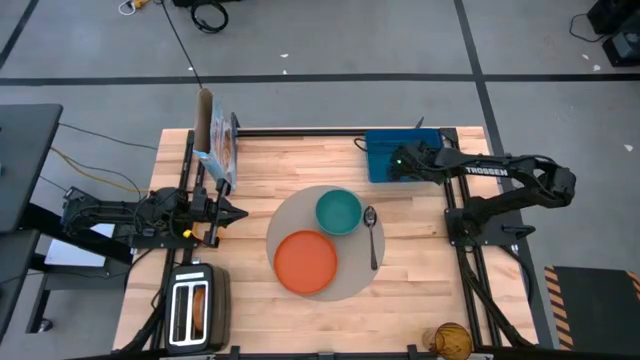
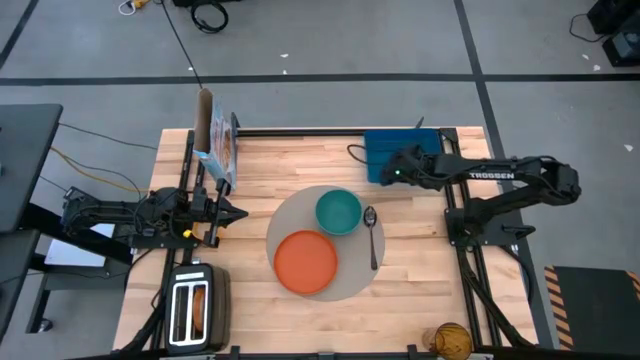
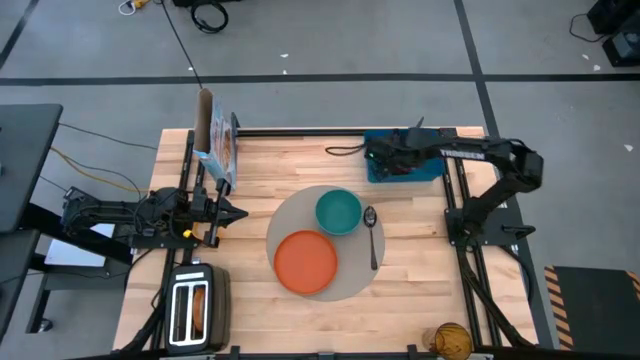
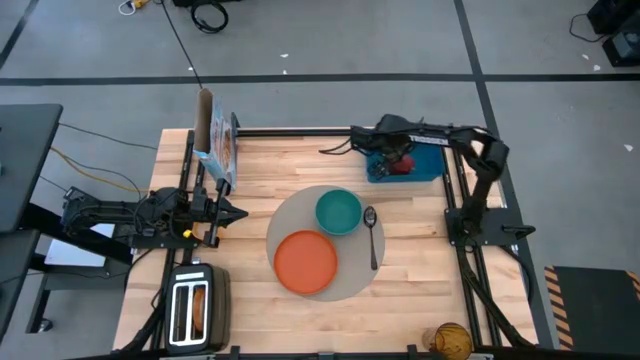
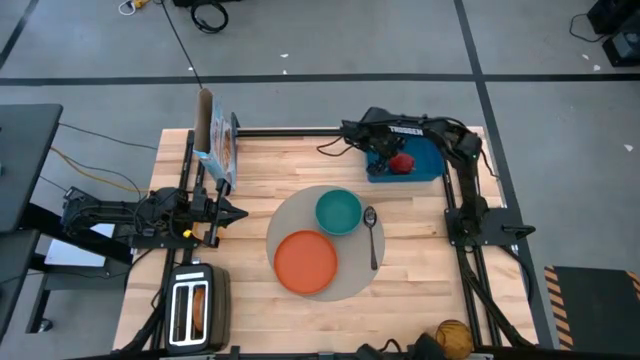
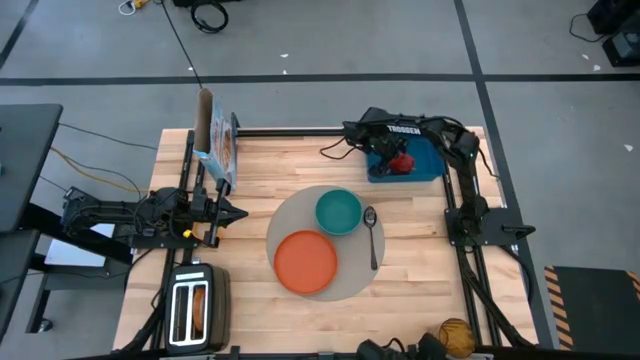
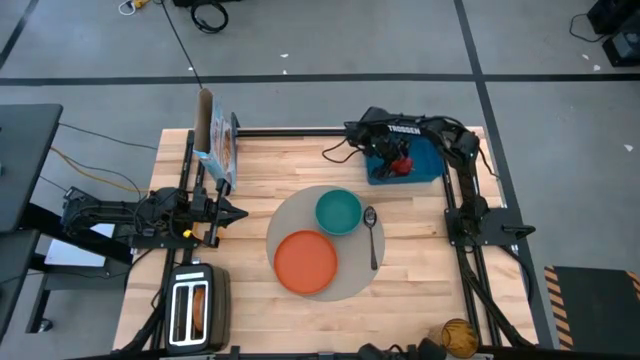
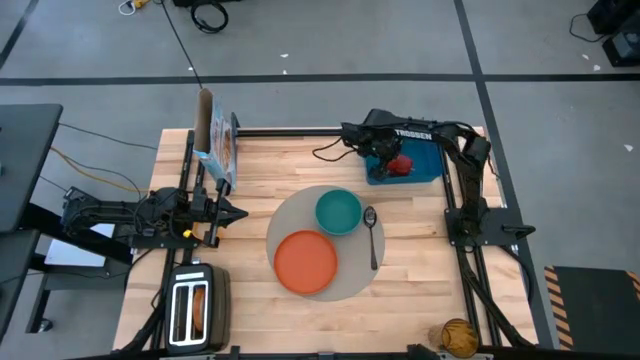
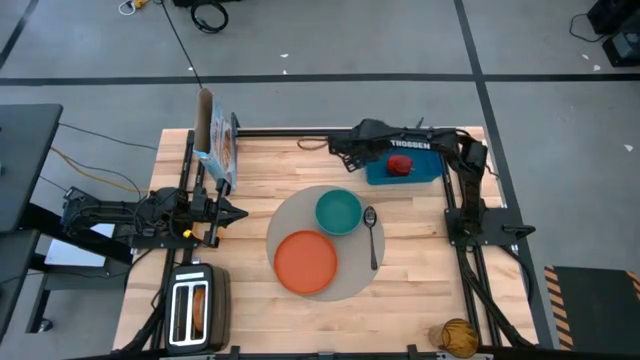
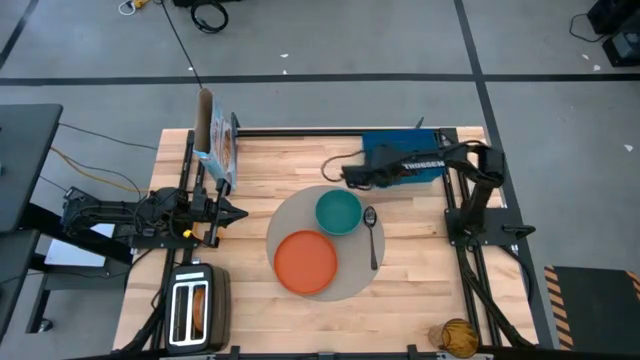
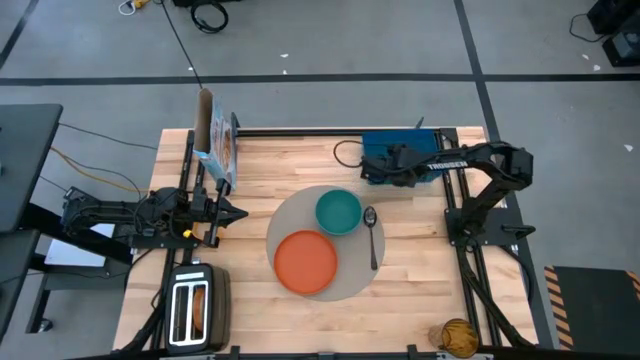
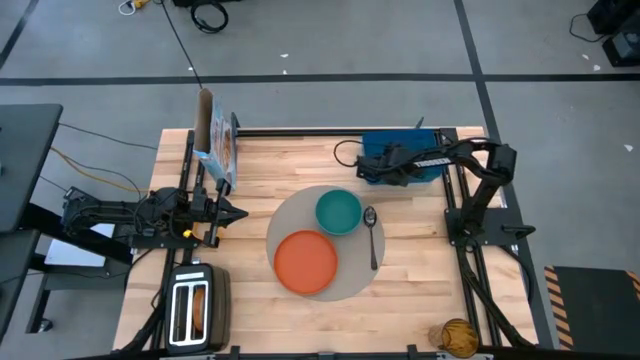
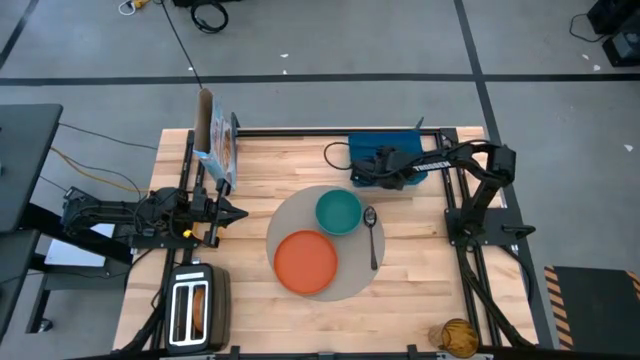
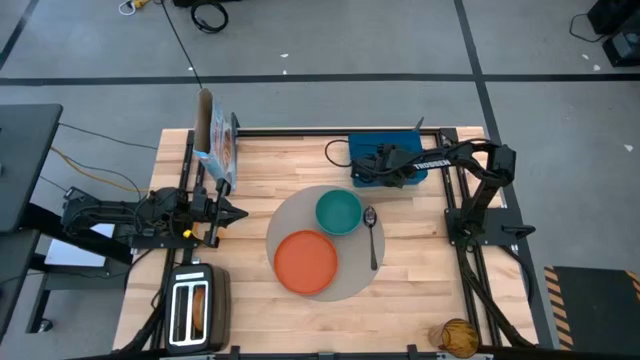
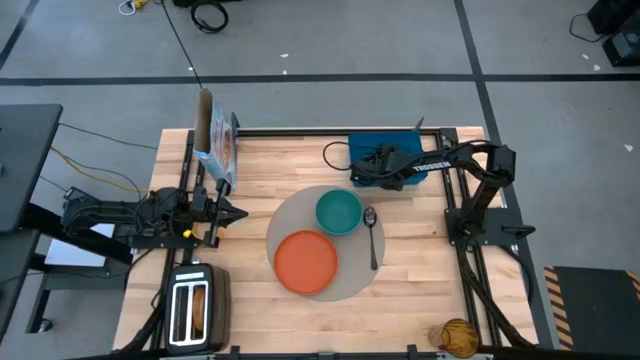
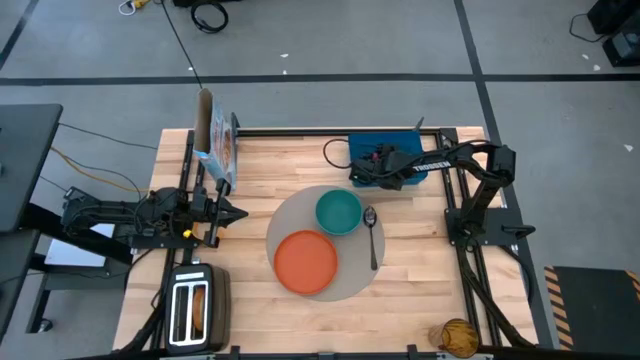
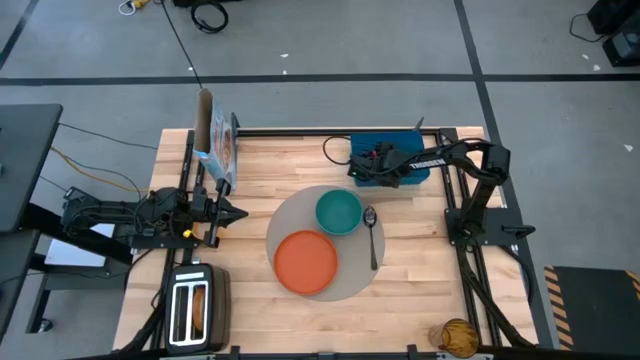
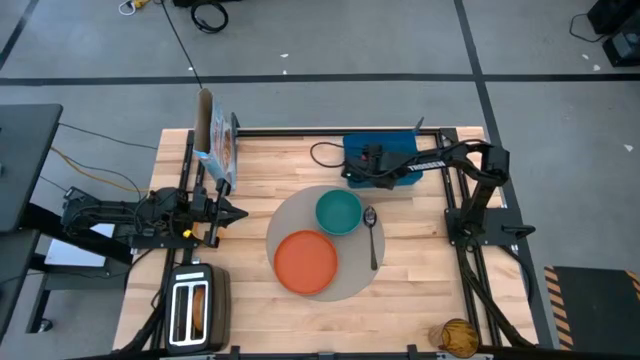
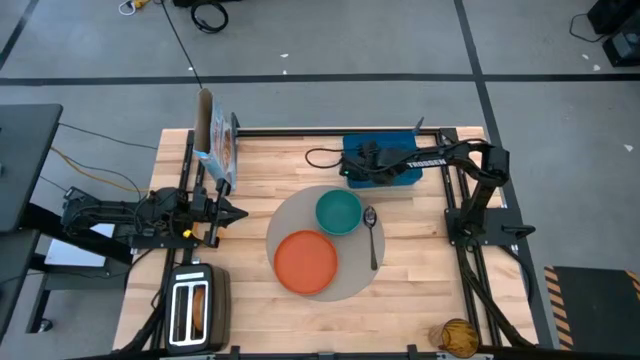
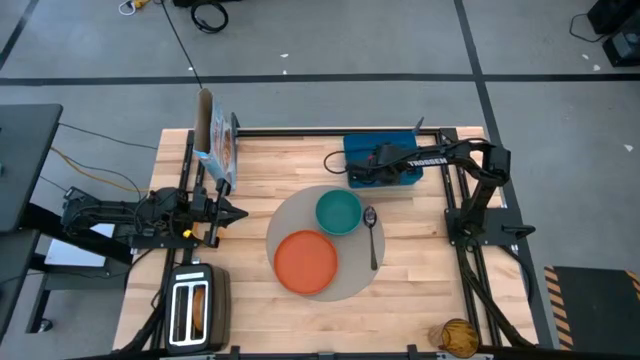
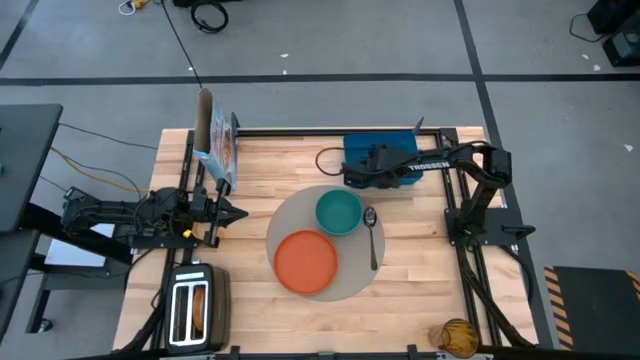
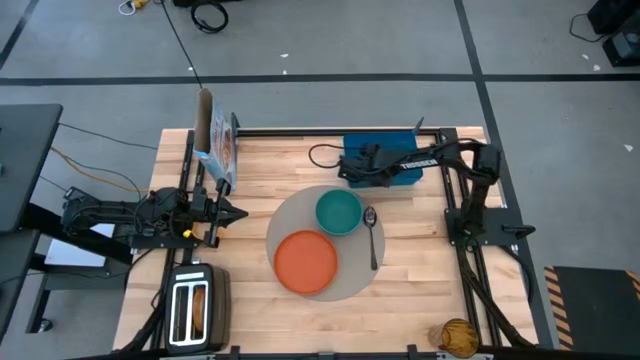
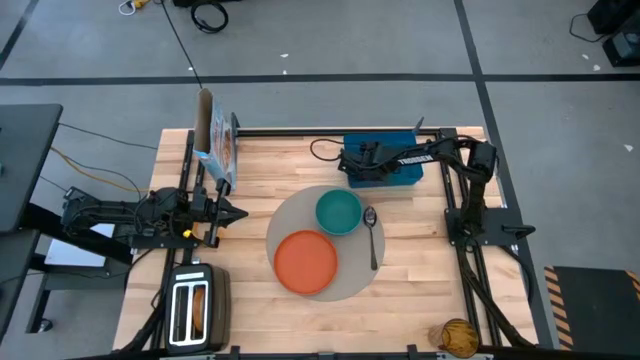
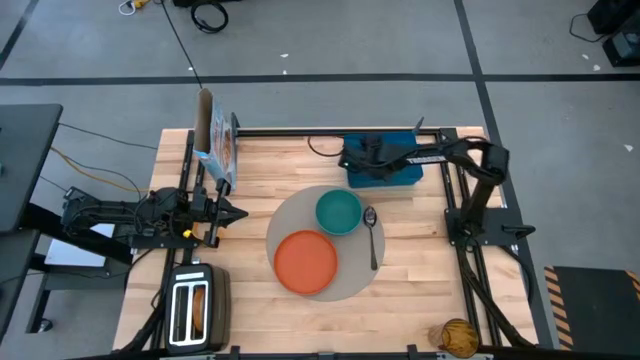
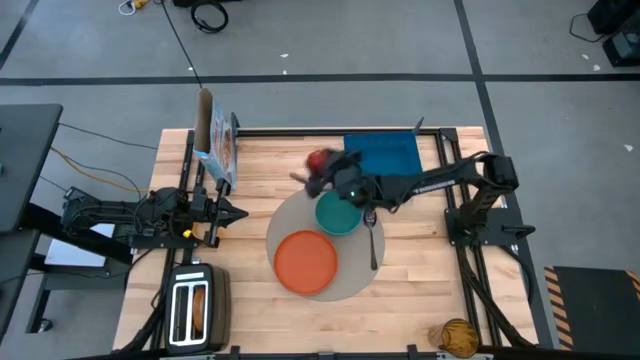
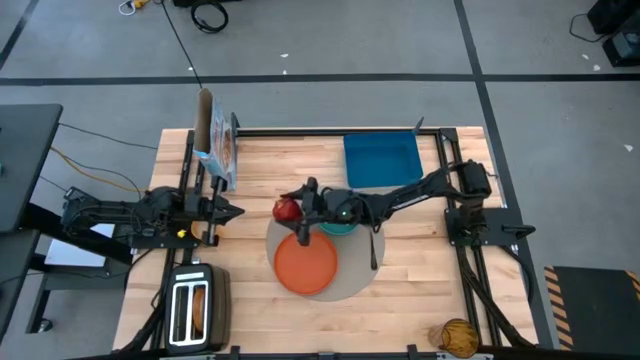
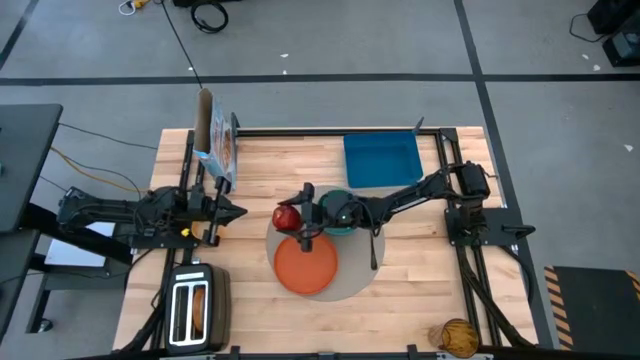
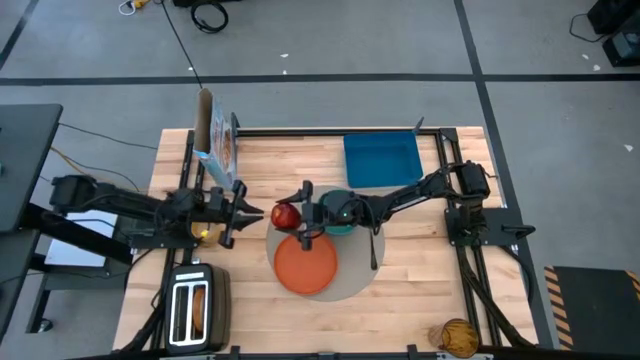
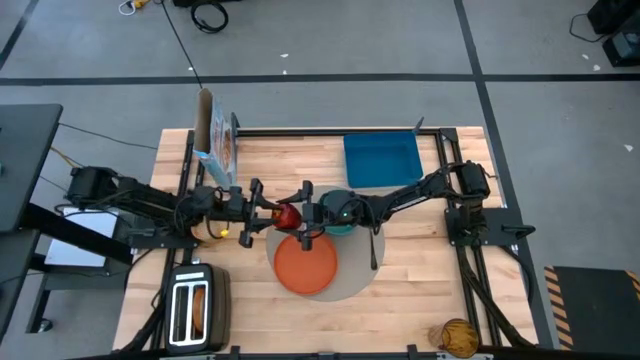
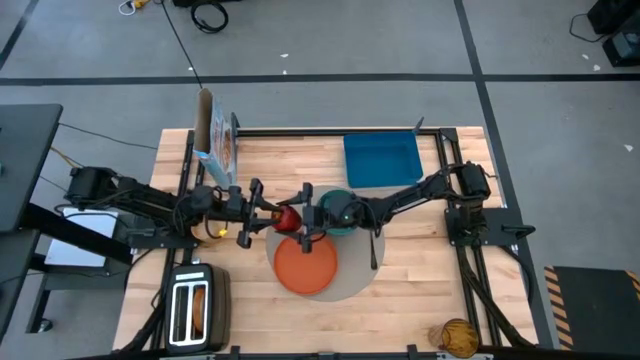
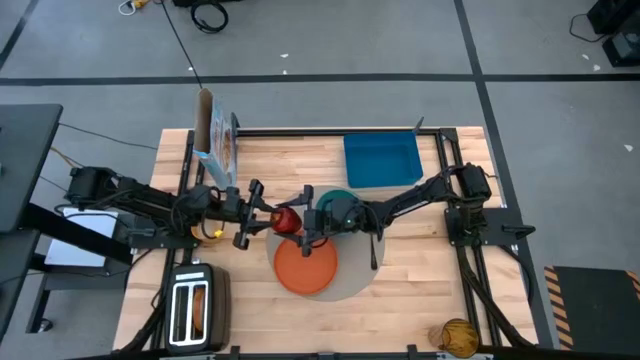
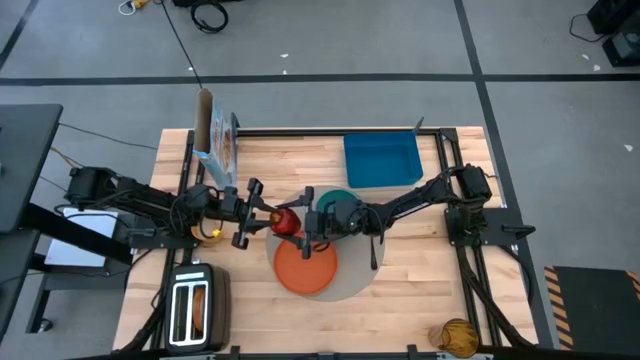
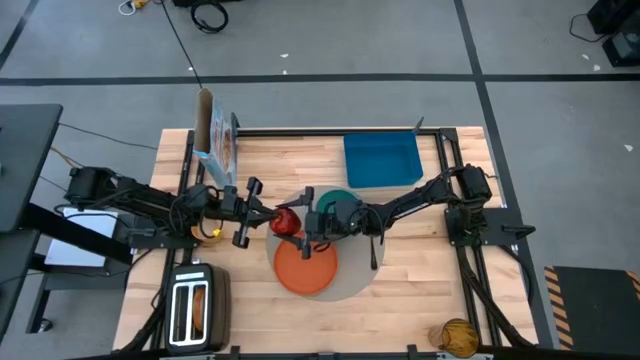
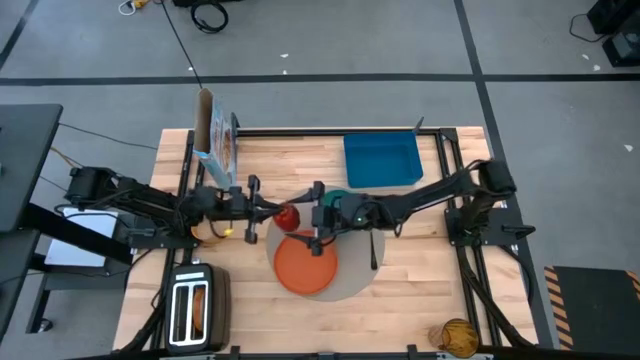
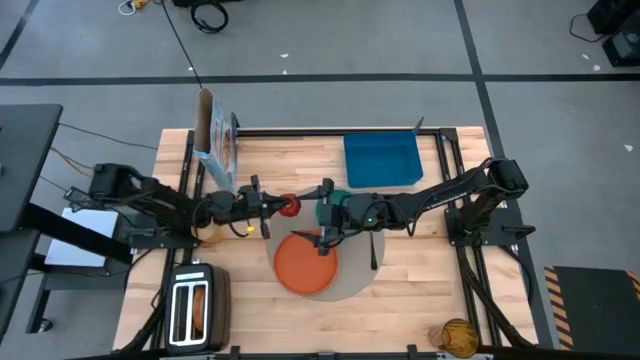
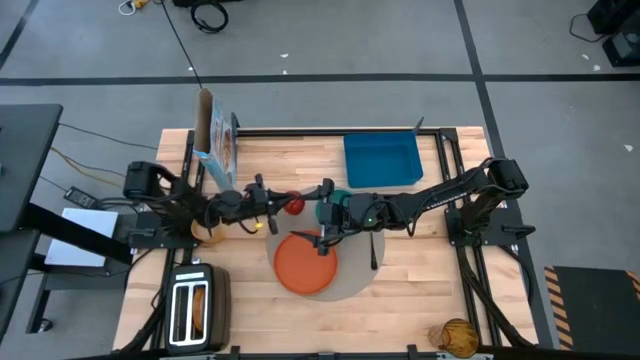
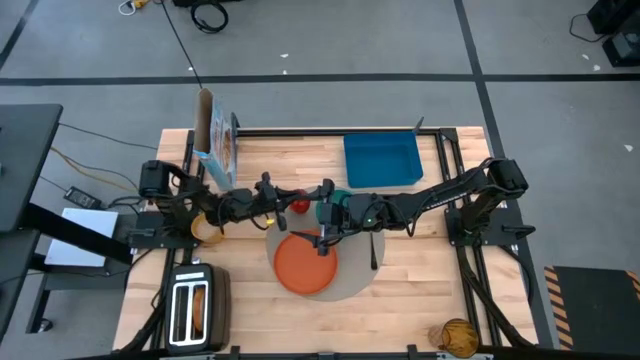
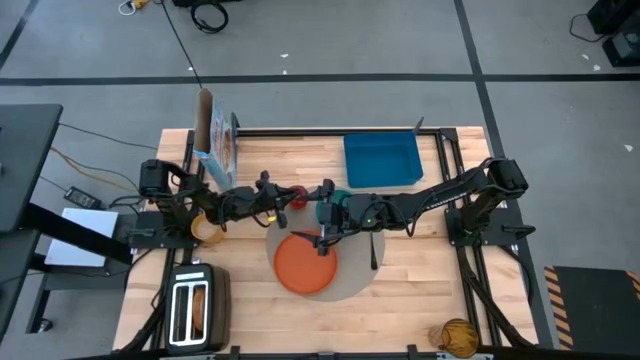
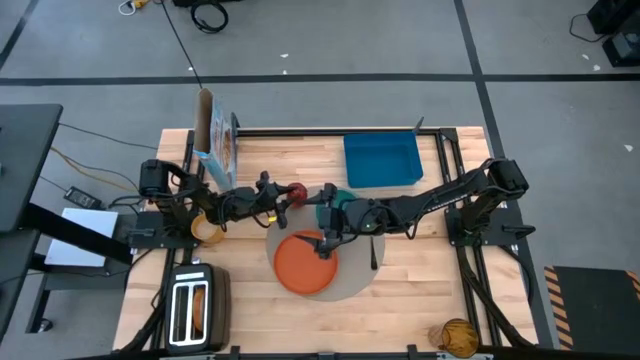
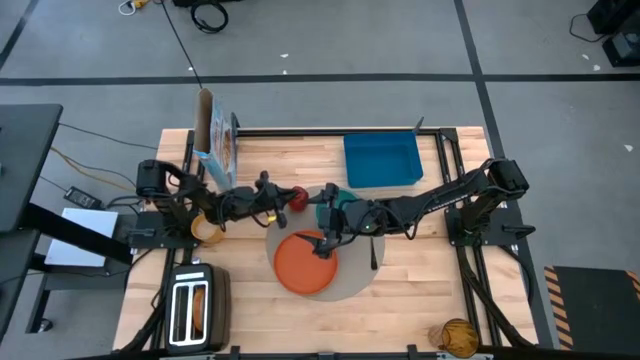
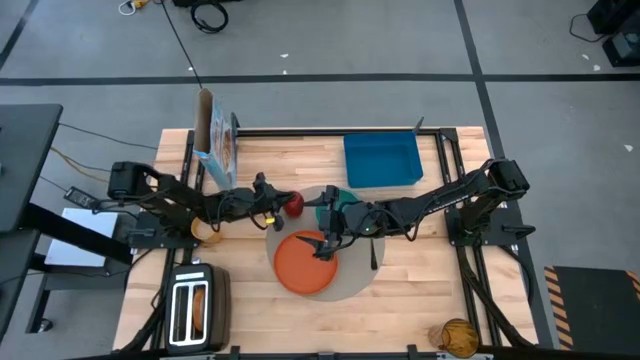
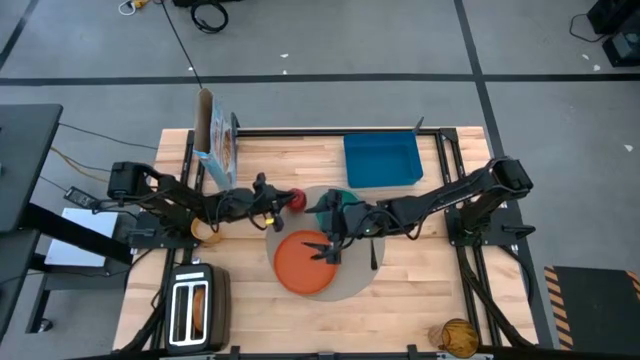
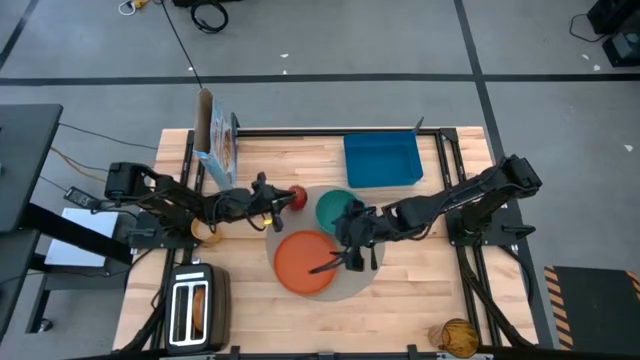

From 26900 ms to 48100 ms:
Task: Arrange a breakfast setting
Put the apple on top left of the round table mat

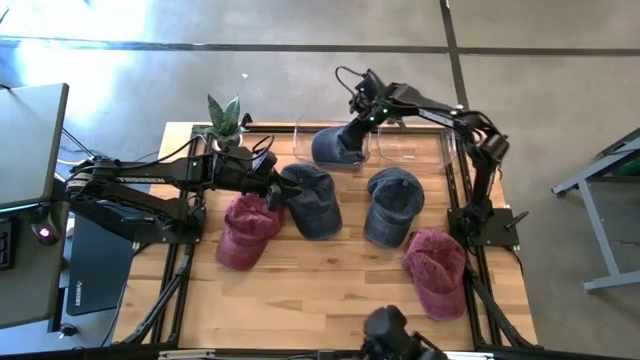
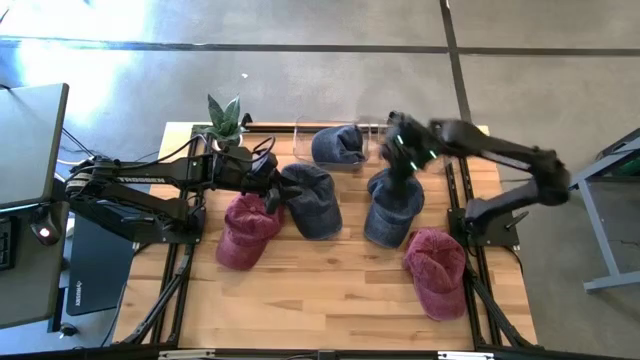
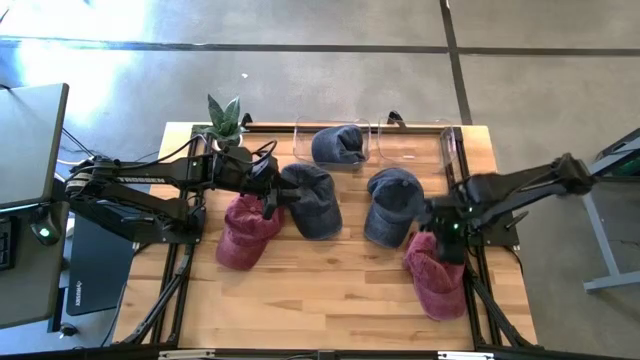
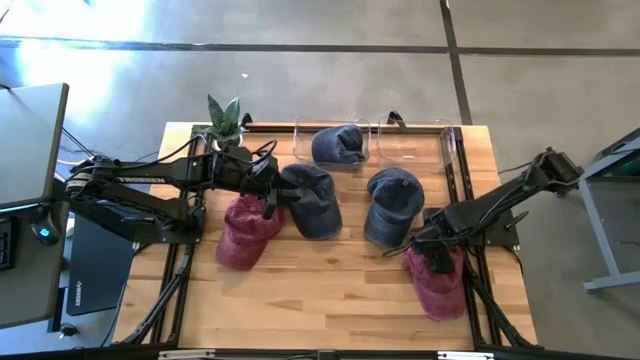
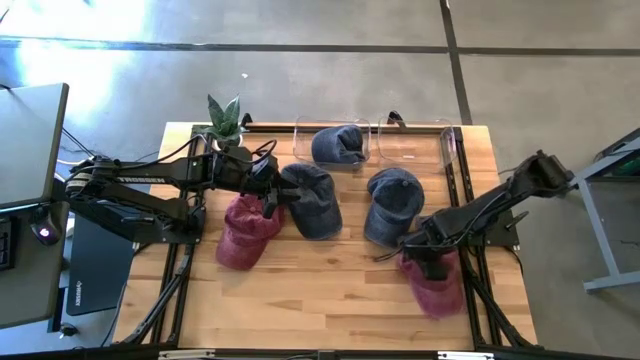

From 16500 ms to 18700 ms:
Task: Pick & Place hat
Put the right red cap into the right transparent bin
